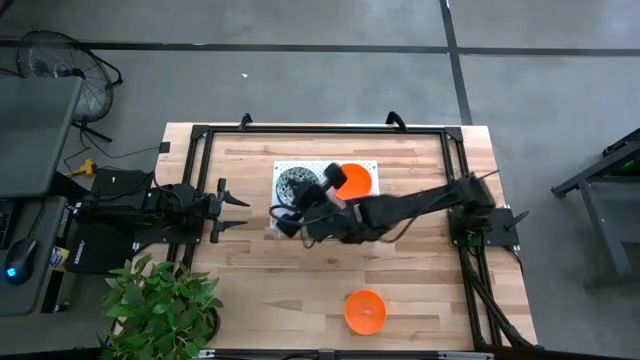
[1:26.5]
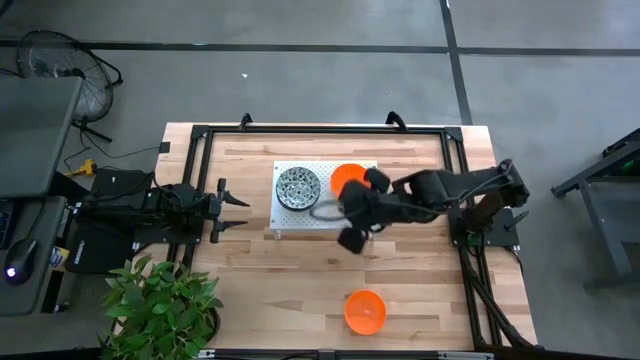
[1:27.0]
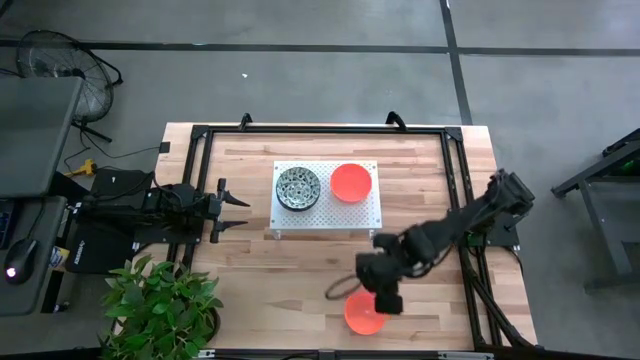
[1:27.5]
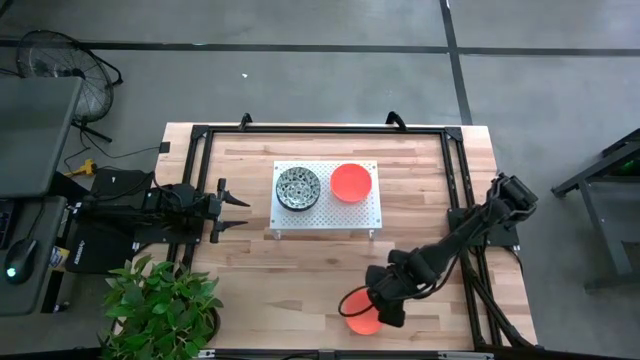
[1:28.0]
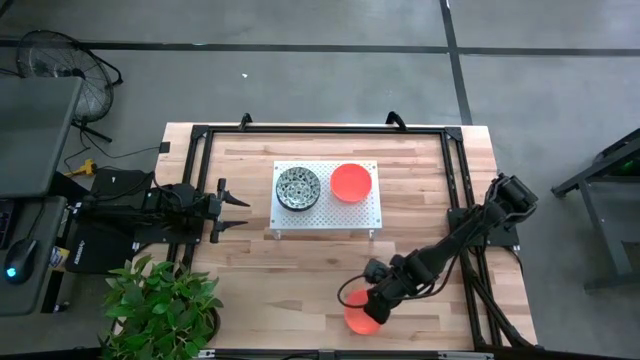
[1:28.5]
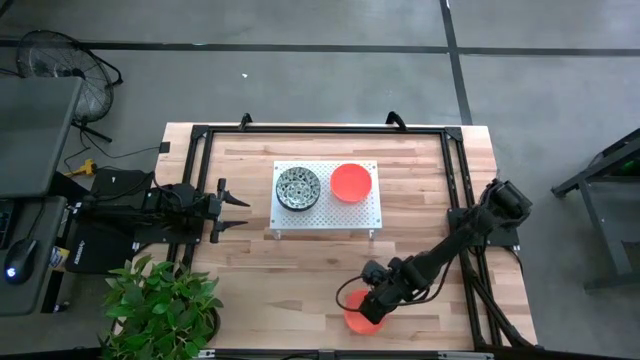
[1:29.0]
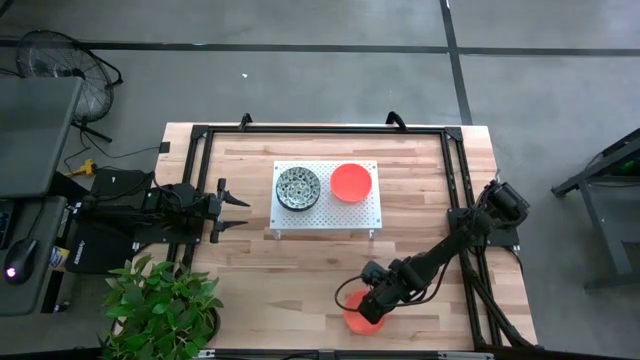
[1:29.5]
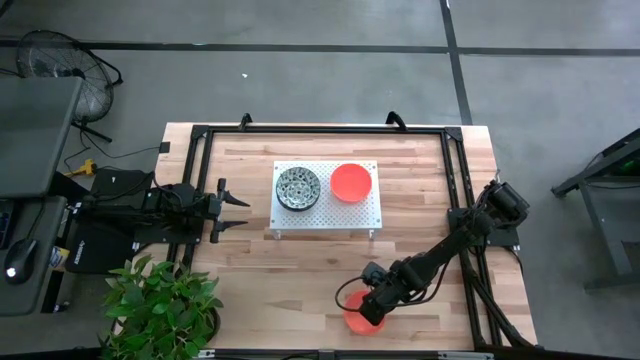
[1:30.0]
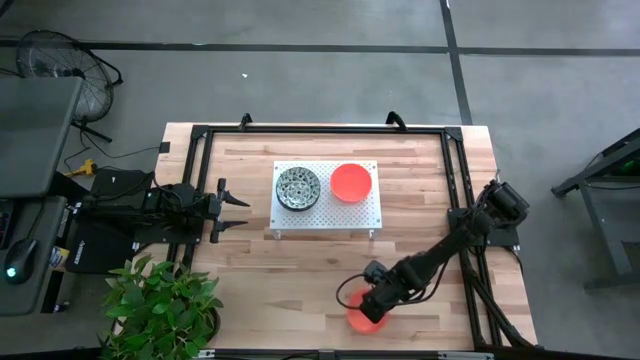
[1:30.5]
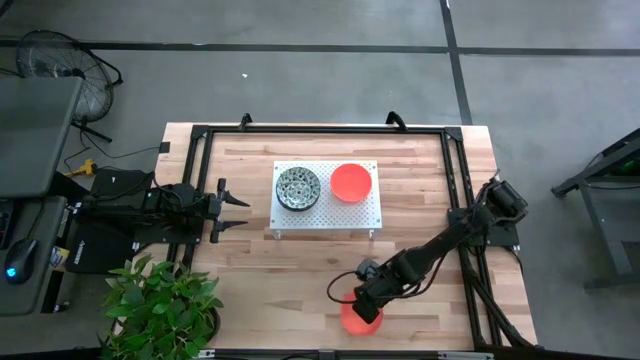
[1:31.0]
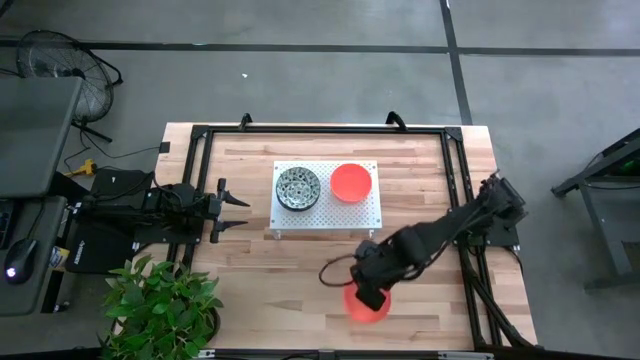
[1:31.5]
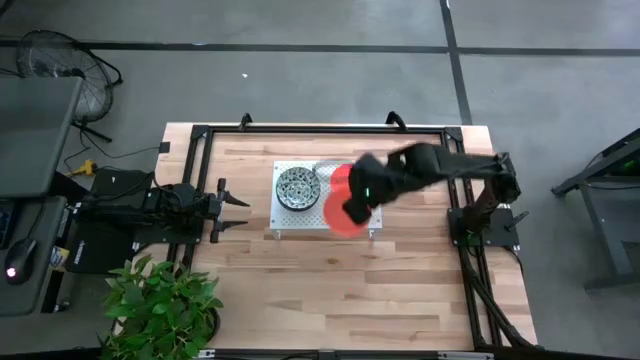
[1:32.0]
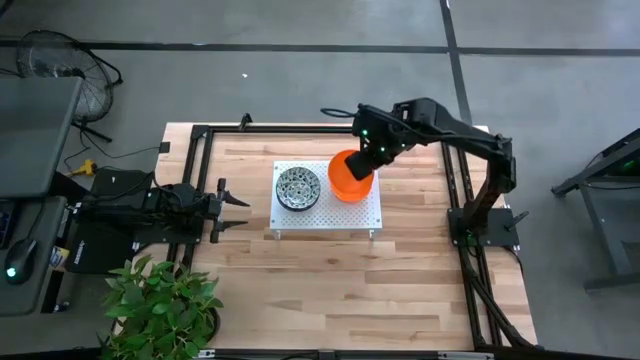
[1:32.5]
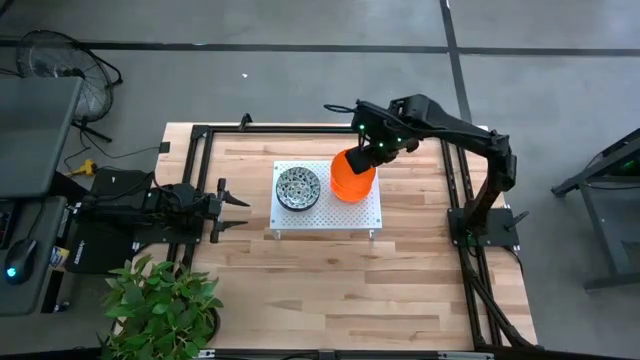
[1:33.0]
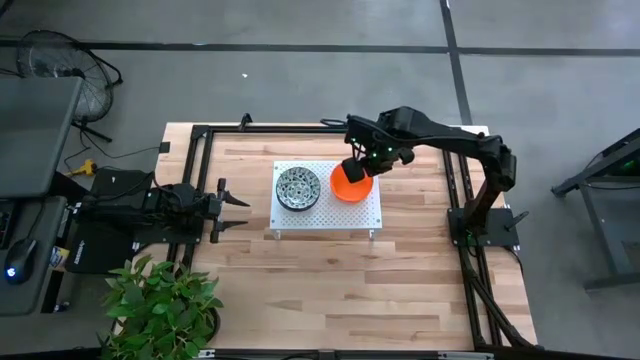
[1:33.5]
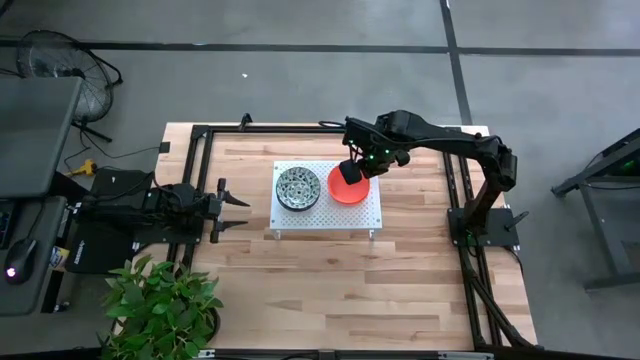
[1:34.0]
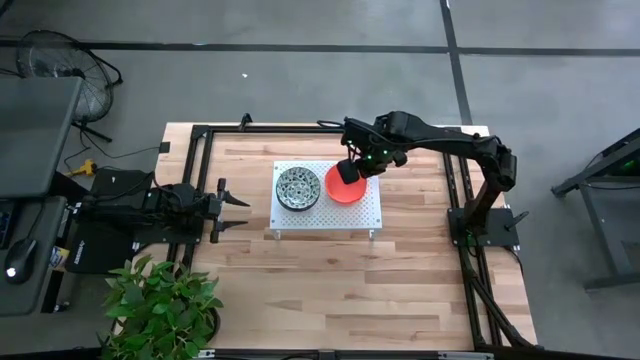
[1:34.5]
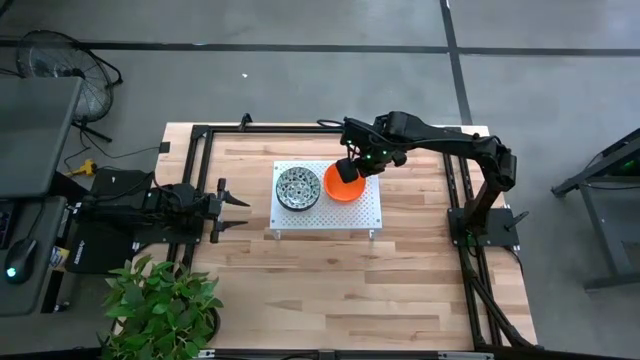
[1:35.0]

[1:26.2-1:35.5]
Task: Pick & Place Mini bowls
Stack the orange bowl on the orange bowl on the shelf

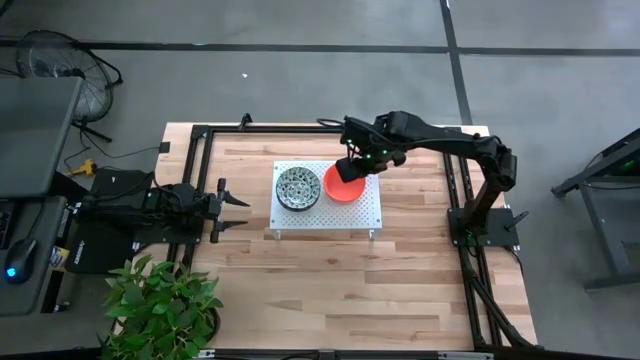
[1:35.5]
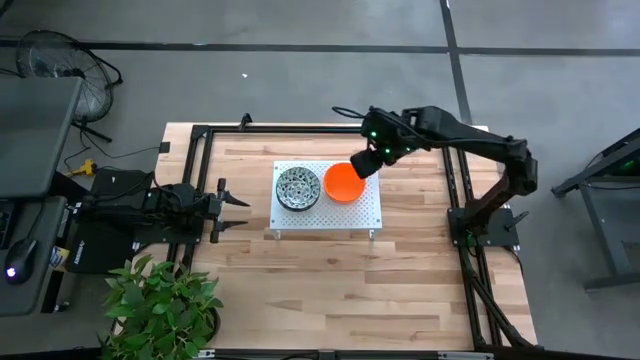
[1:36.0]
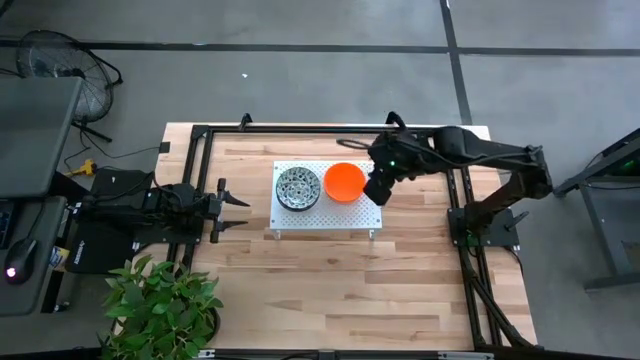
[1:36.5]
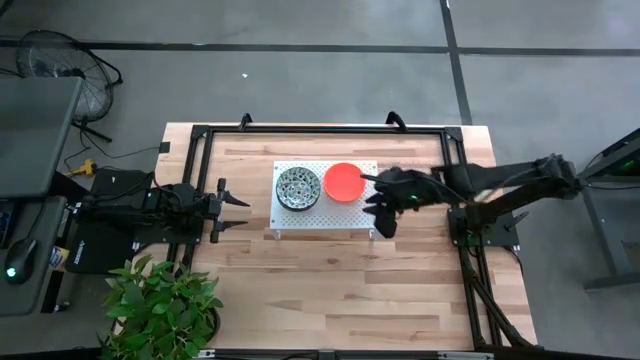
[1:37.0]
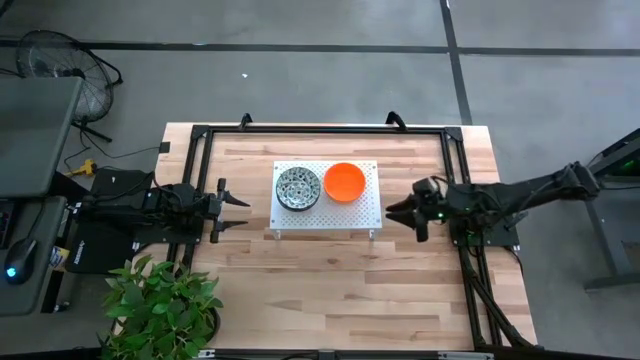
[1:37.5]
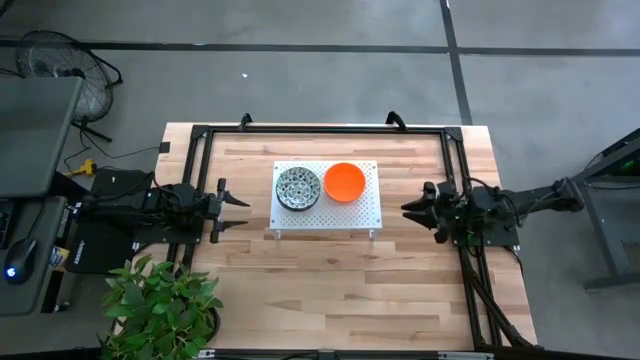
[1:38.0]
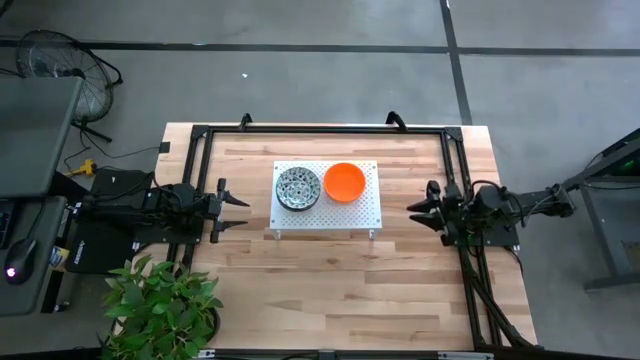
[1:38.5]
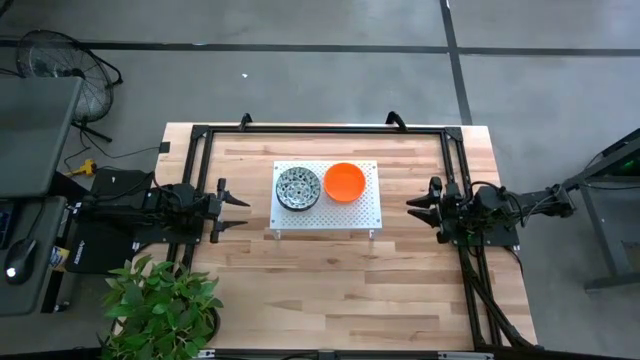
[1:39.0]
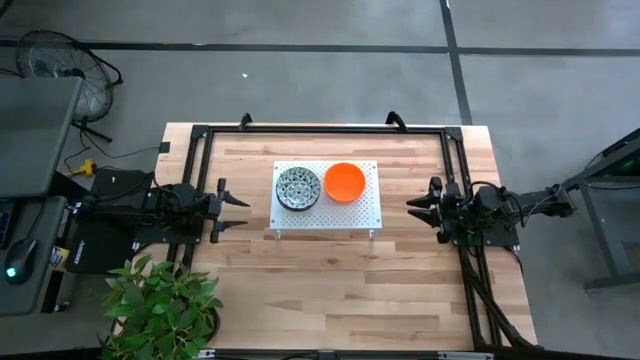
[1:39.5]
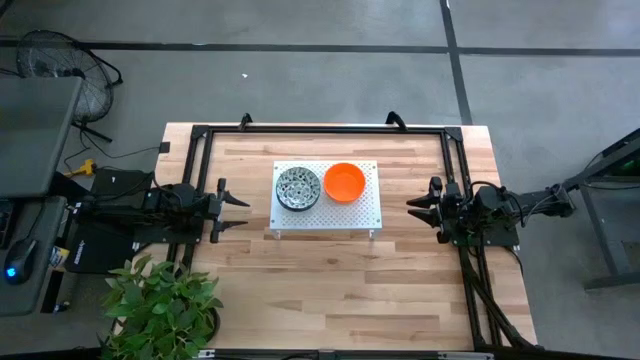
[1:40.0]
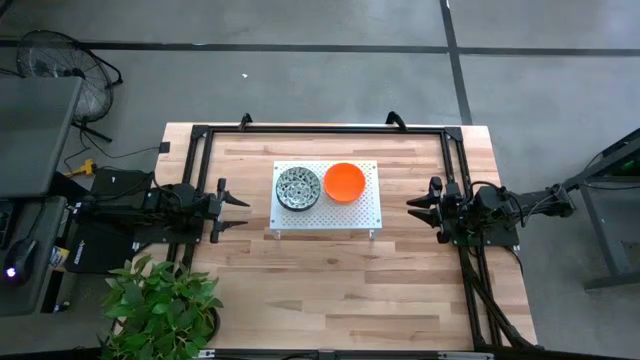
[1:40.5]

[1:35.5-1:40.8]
Return to Home Position

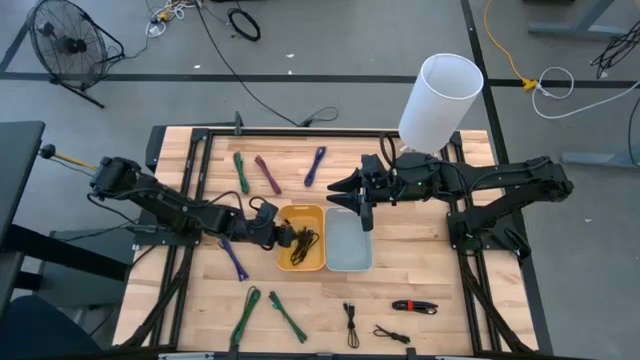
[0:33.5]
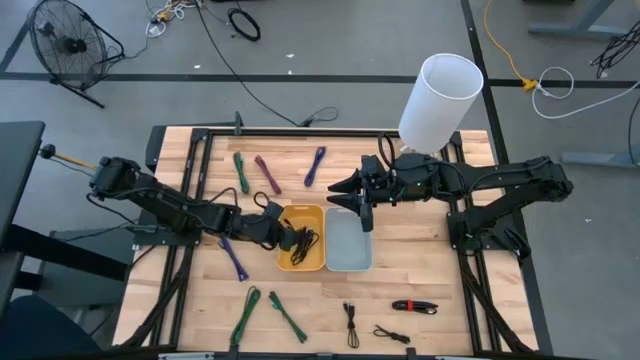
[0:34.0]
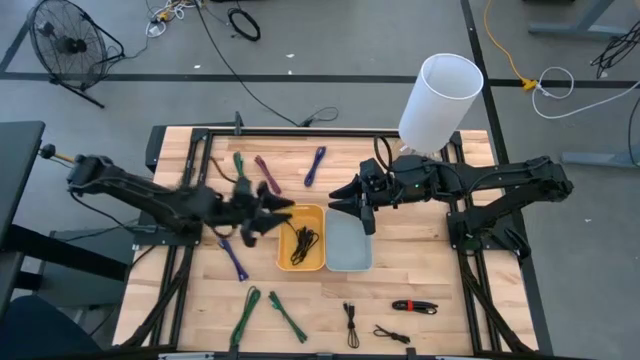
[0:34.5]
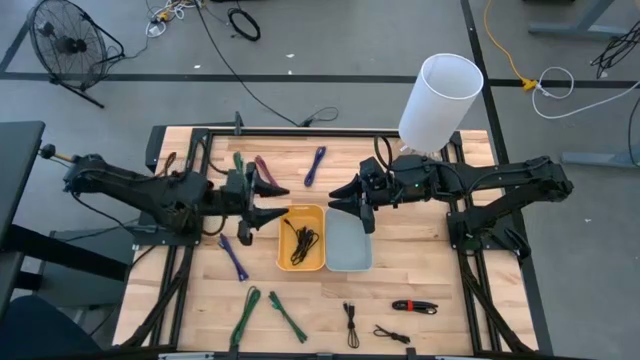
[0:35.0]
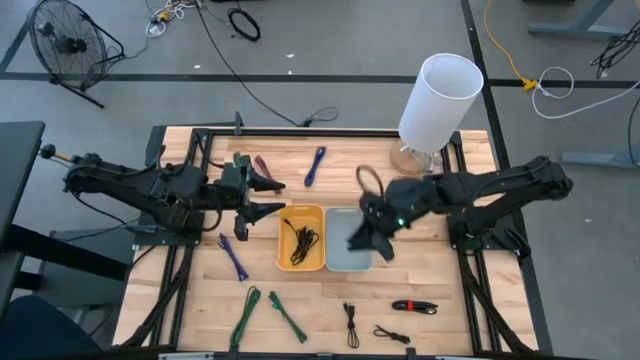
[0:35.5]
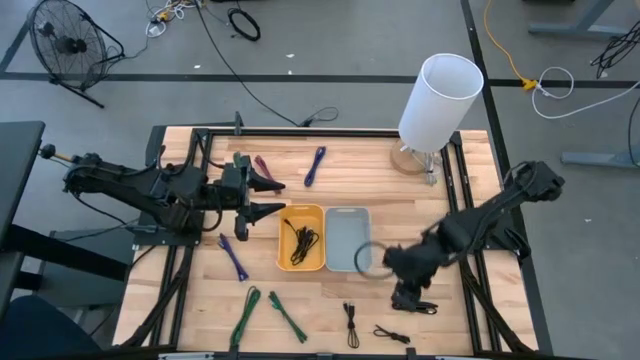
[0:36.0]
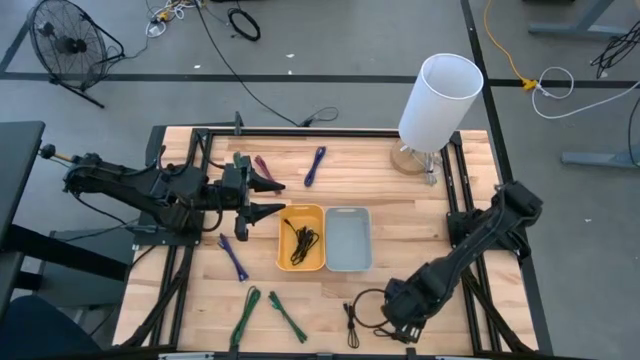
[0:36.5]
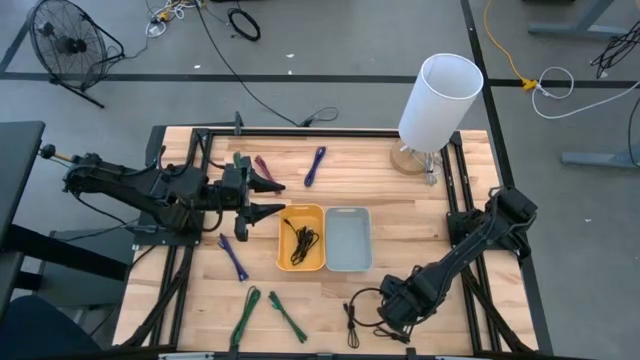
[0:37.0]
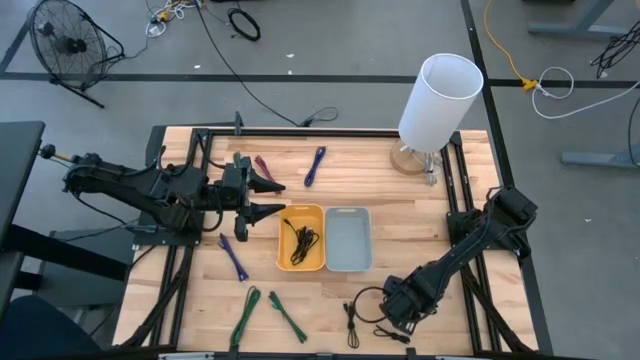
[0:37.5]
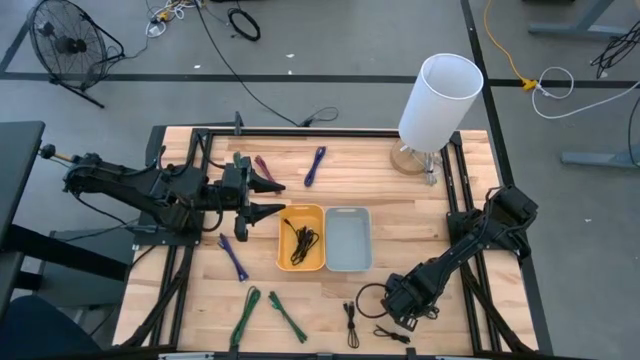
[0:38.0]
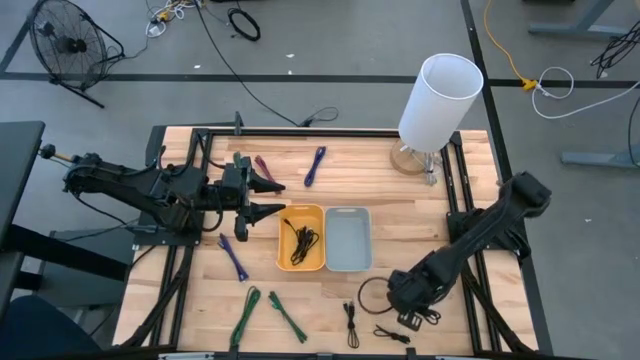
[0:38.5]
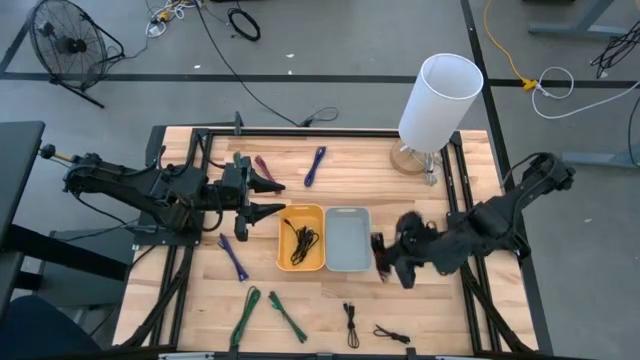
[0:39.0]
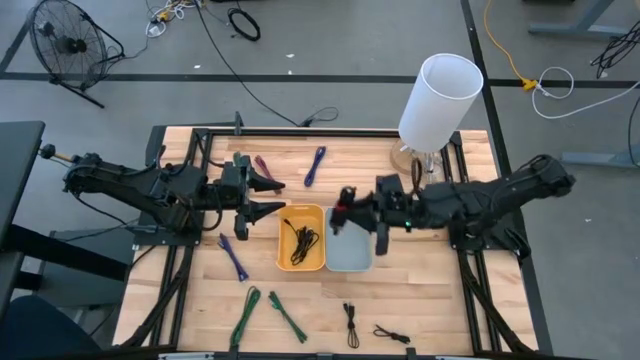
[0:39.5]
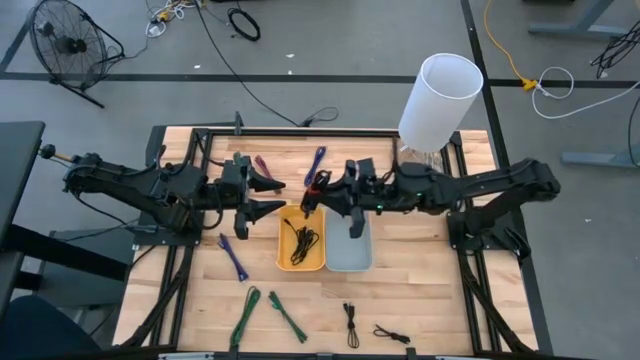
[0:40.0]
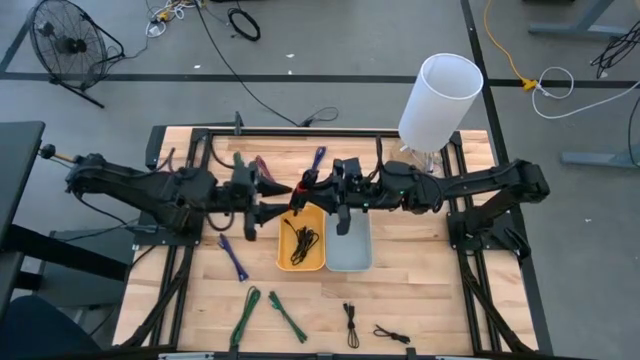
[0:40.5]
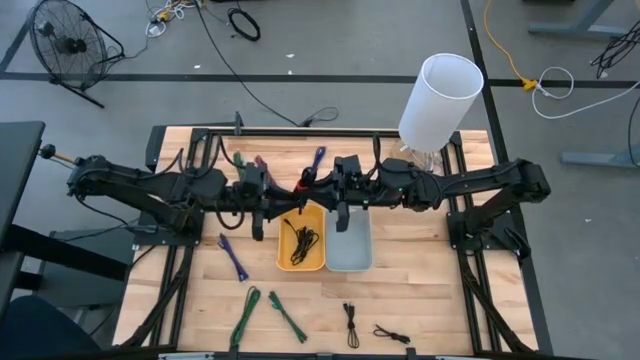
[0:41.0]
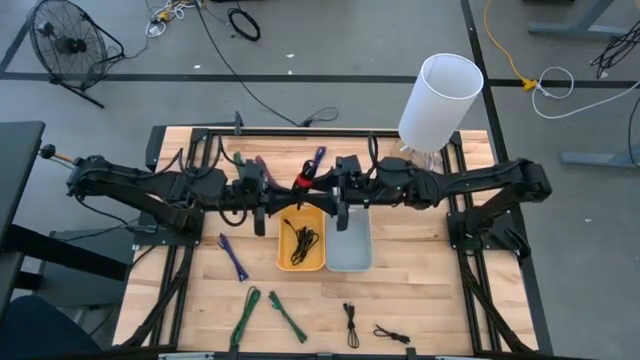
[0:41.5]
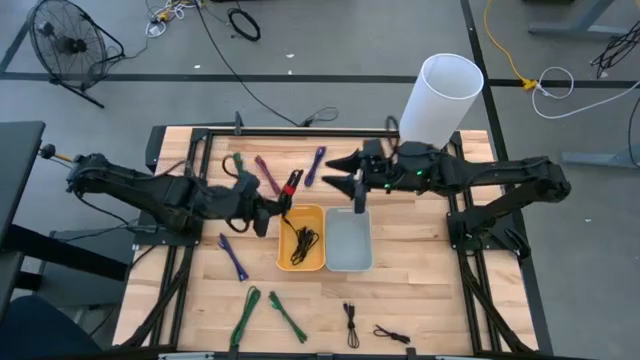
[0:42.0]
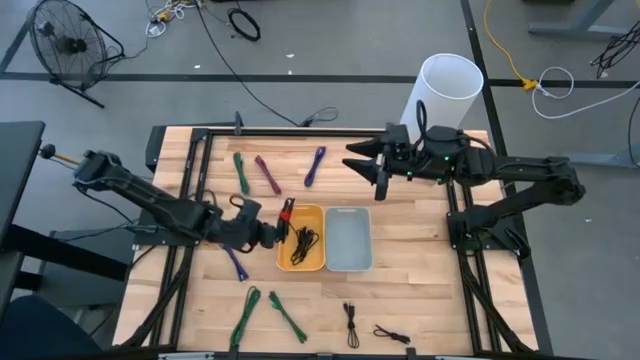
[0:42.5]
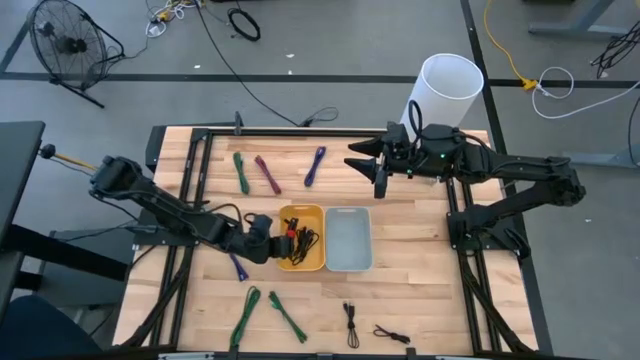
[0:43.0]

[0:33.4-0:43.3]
Task: Pick & Place USB Port
Put the black charger cable into the yellow bin
